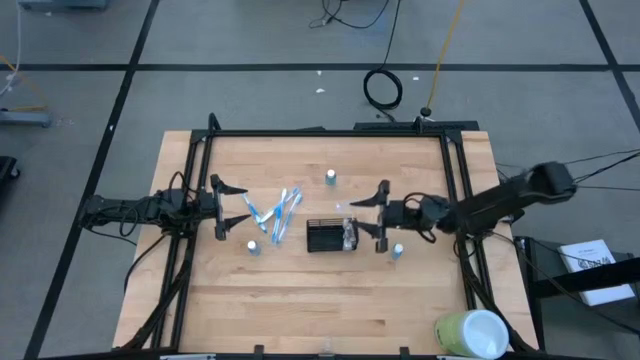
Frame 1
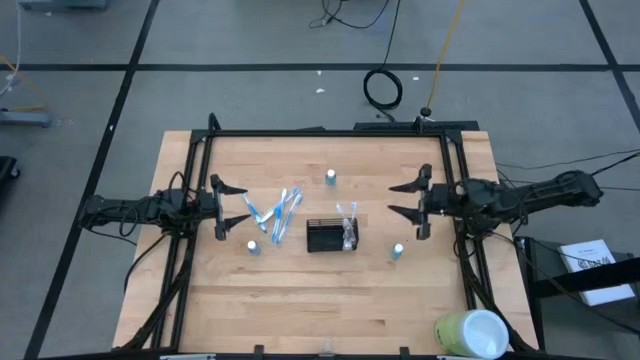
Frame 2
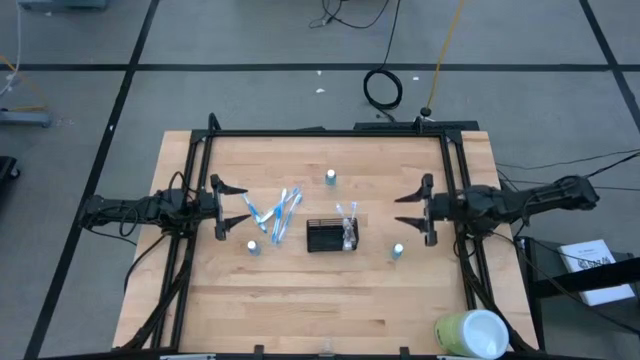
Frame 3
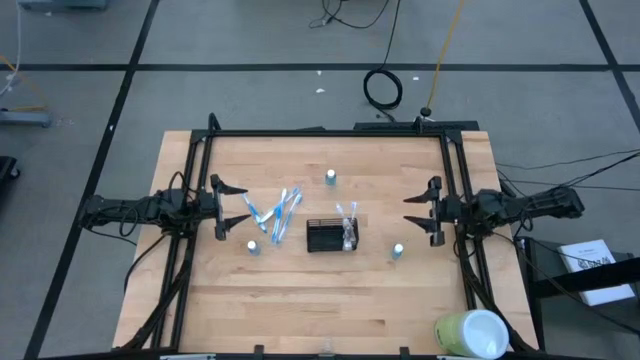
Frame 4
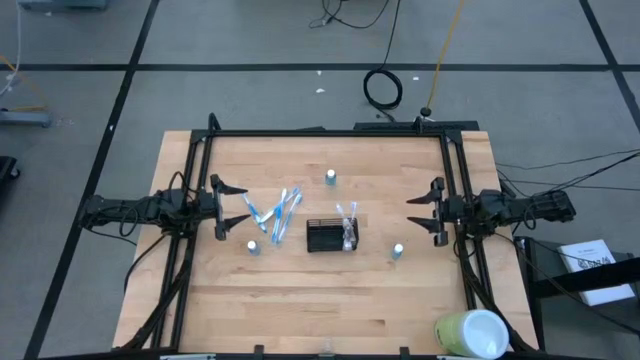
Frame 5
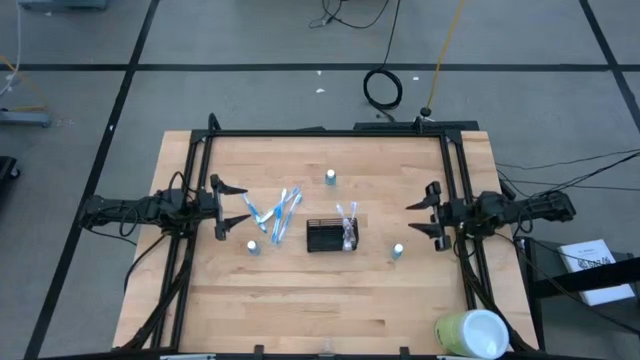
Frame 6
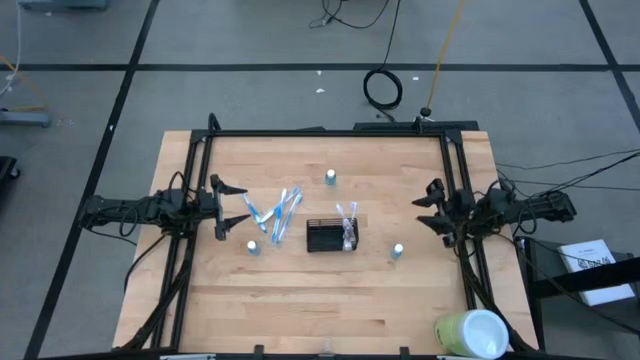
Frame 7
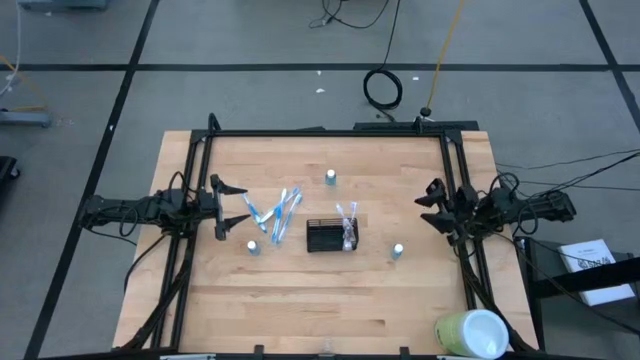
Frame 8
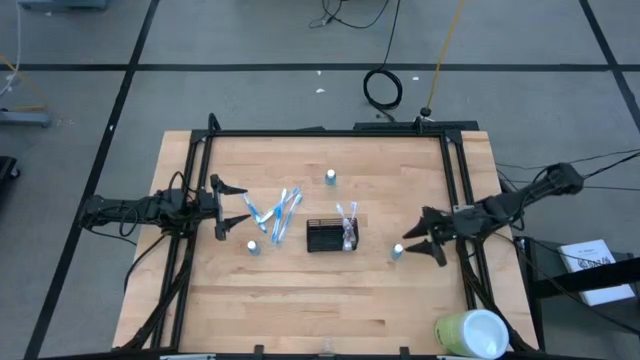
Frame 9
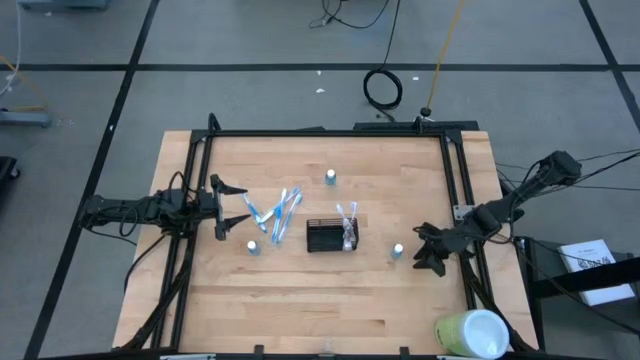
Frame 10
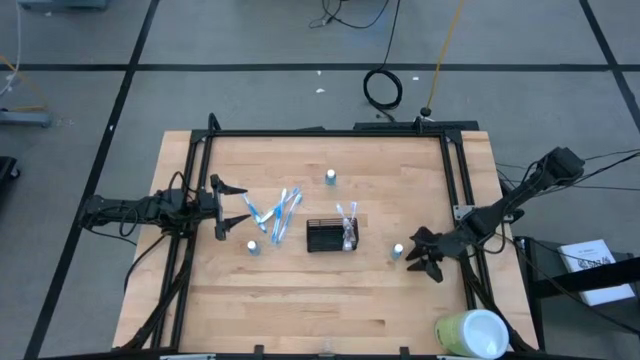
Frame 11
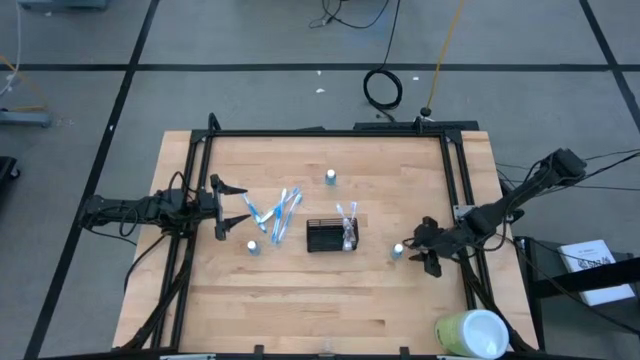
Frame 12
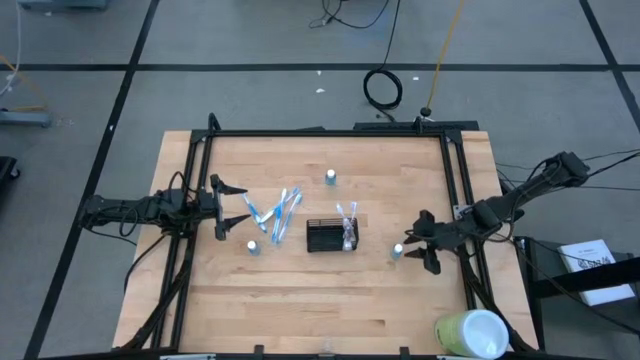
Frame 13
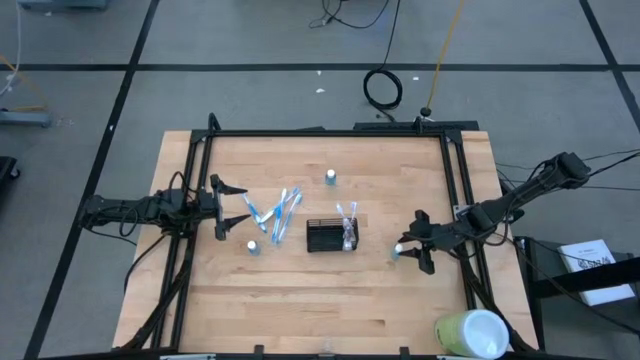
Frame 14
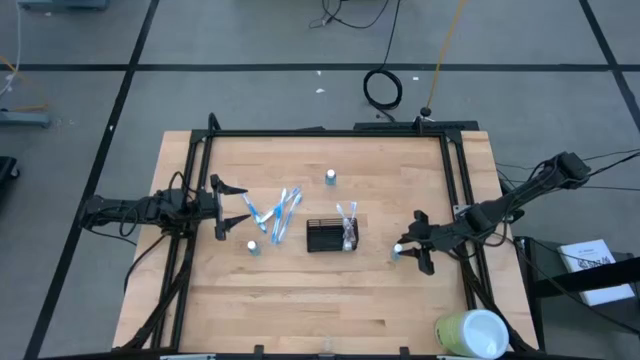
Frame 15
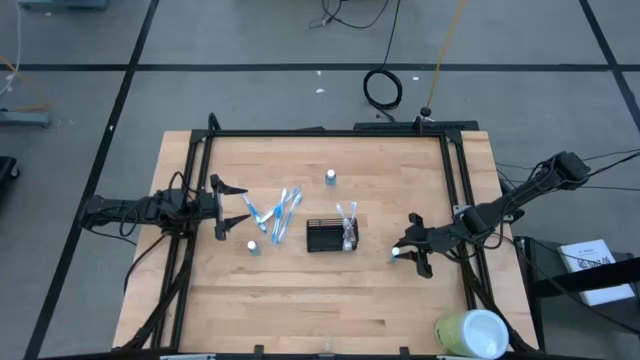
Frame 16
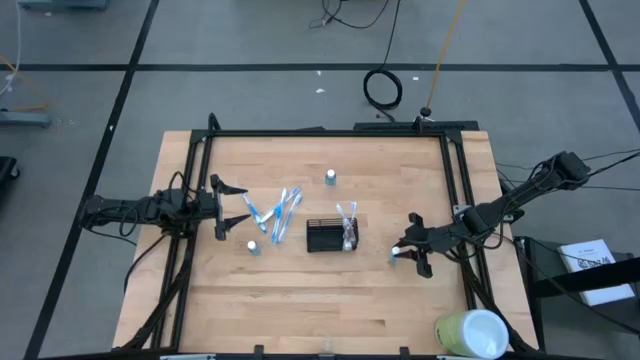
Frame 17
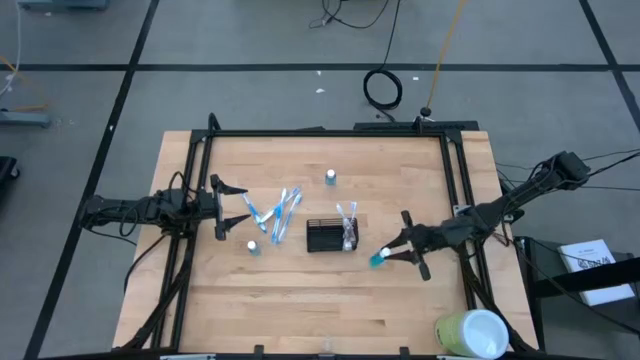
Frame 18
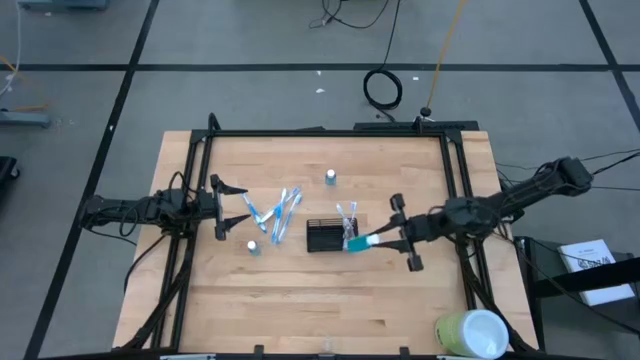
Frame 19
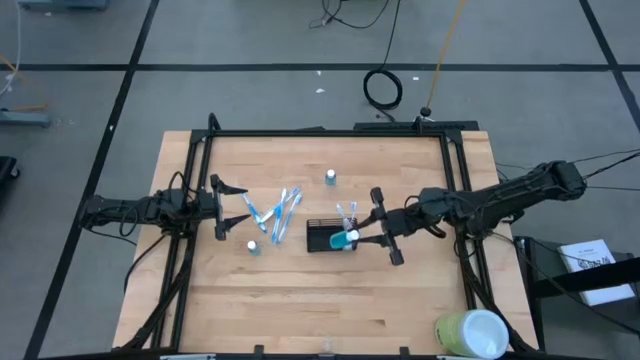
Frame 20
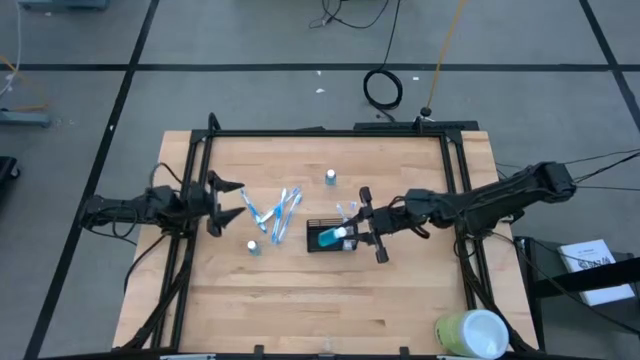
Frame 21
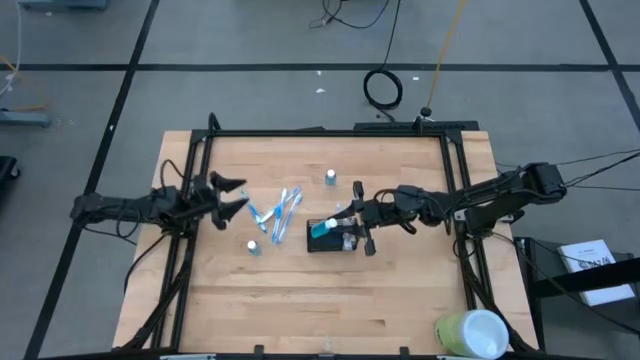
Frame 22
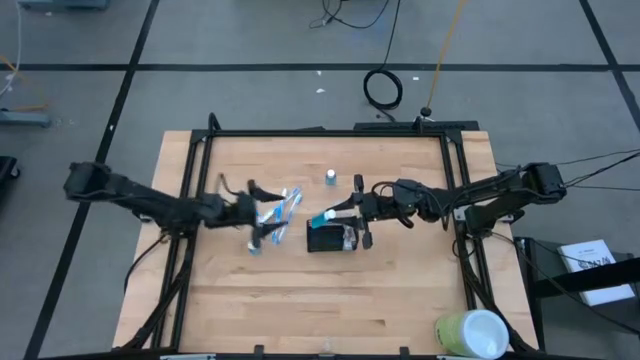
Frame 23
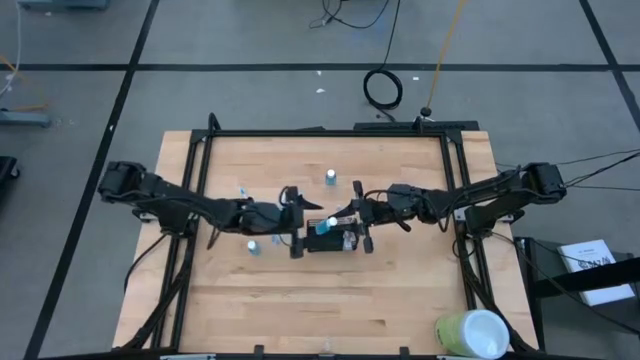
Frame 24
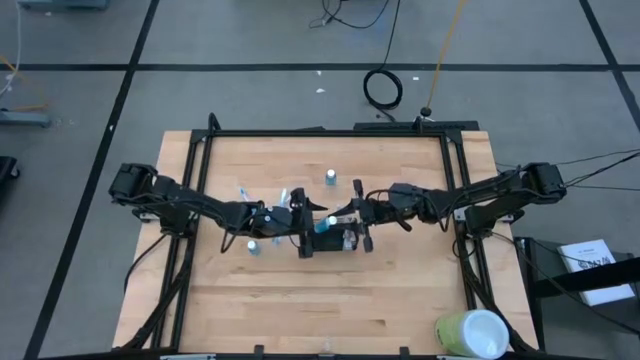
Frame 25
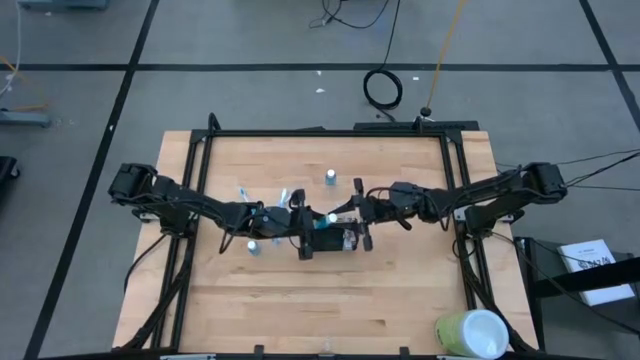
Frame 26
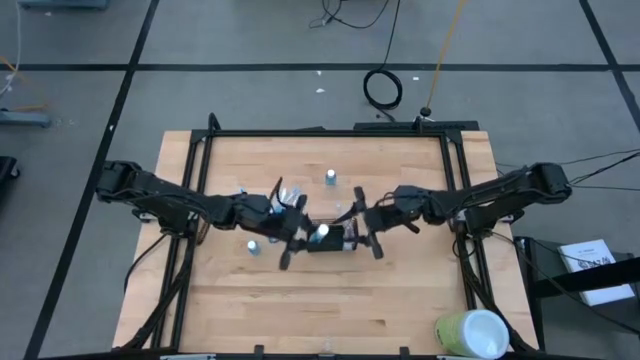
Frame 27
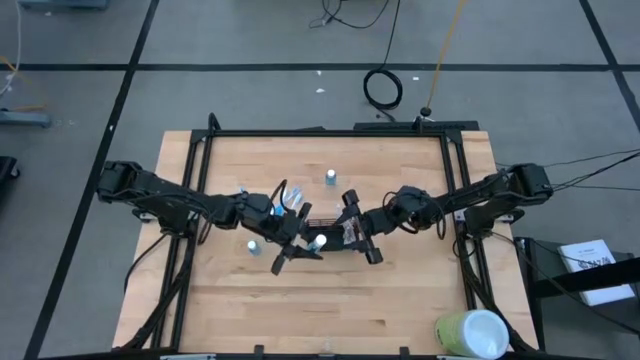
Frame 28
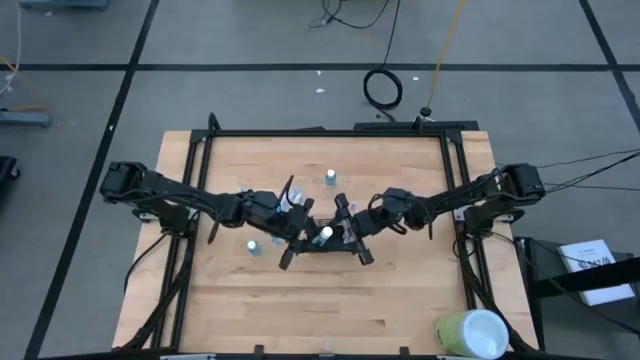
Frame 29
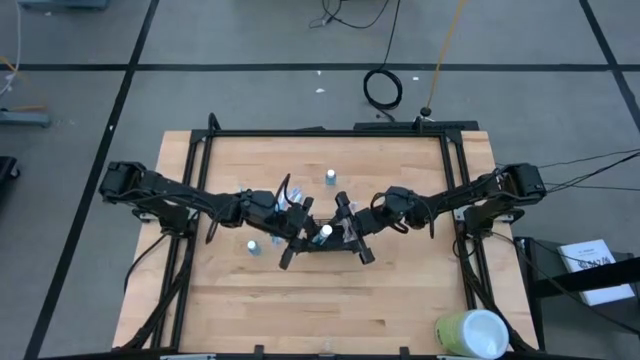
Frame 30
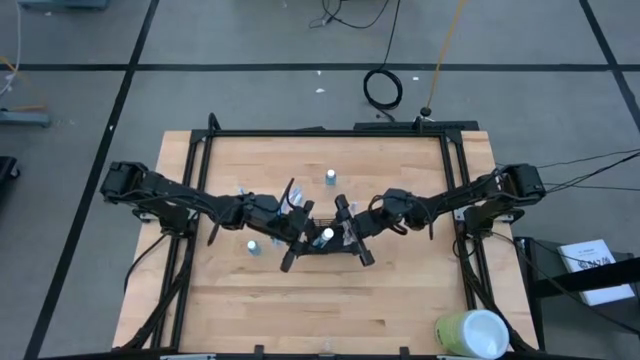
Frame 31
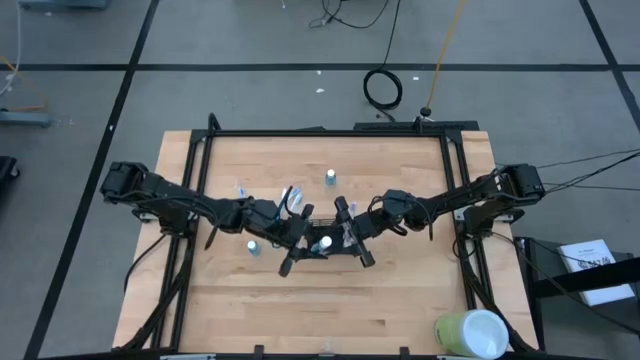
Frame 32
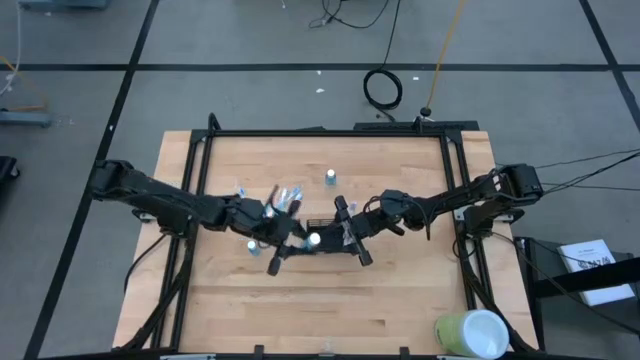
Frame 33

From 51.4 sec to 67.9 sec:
Task: Pick & Place toothbrushing station
Put the bottom right mouthwash into the middle section of the wire organizer

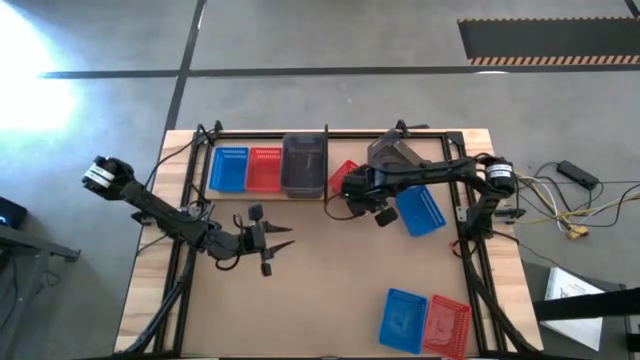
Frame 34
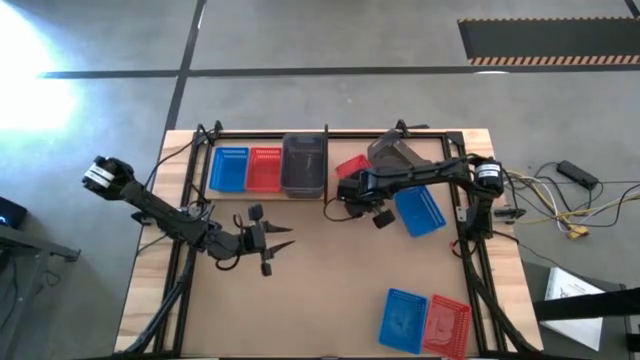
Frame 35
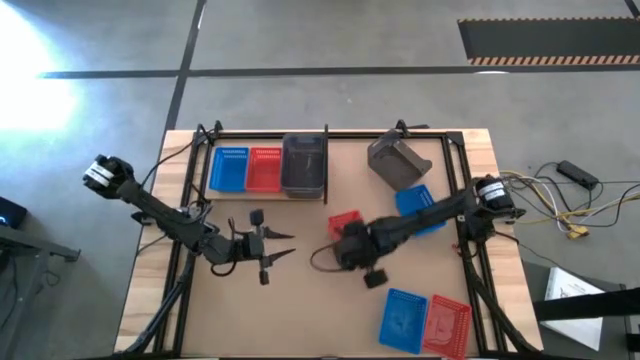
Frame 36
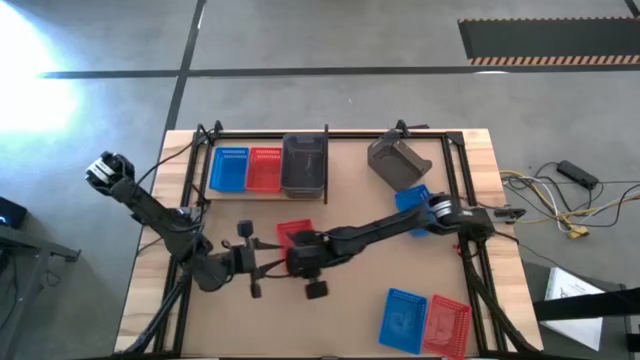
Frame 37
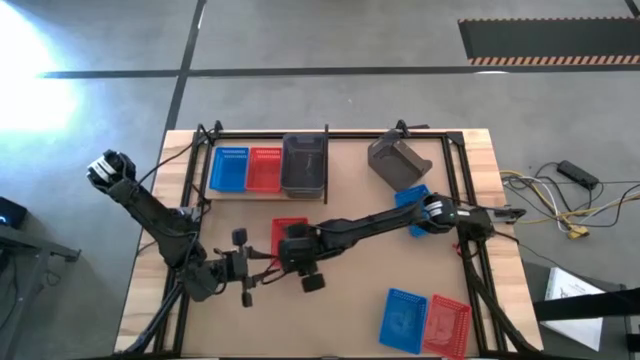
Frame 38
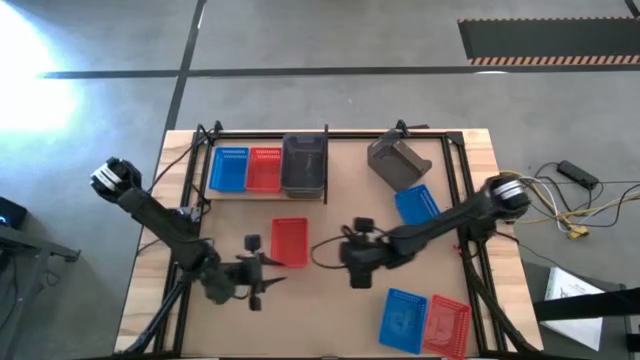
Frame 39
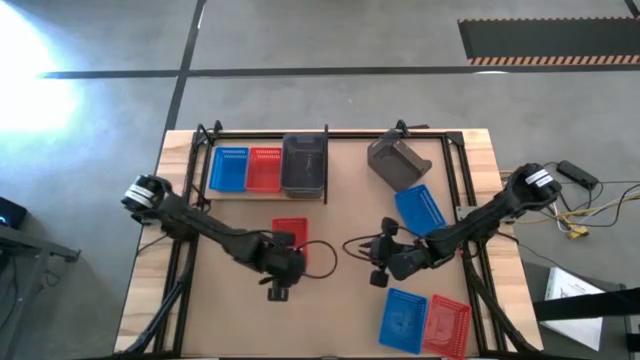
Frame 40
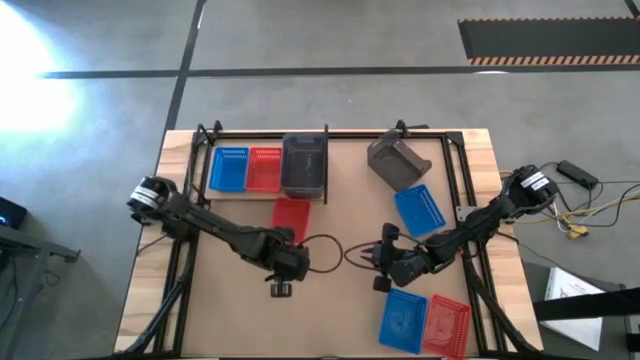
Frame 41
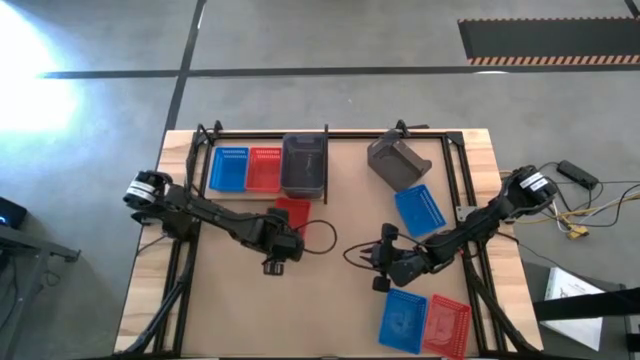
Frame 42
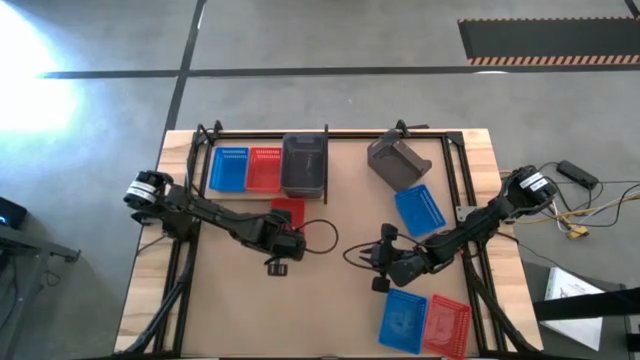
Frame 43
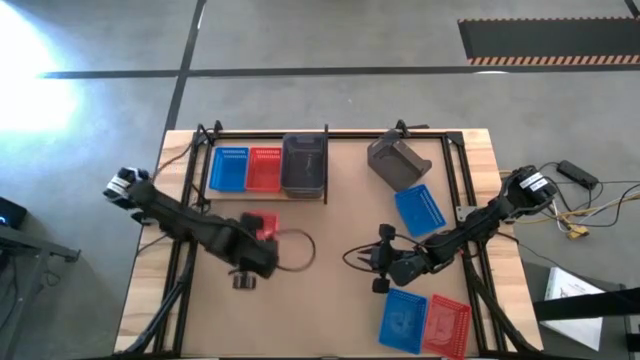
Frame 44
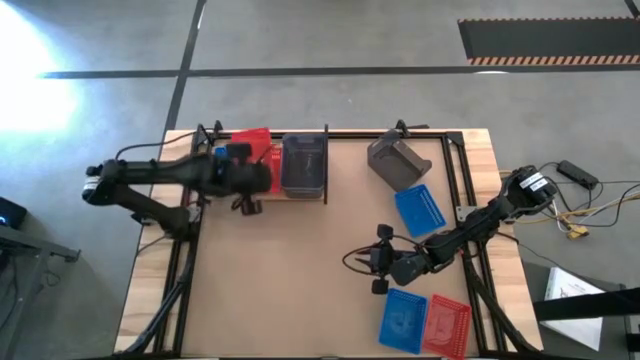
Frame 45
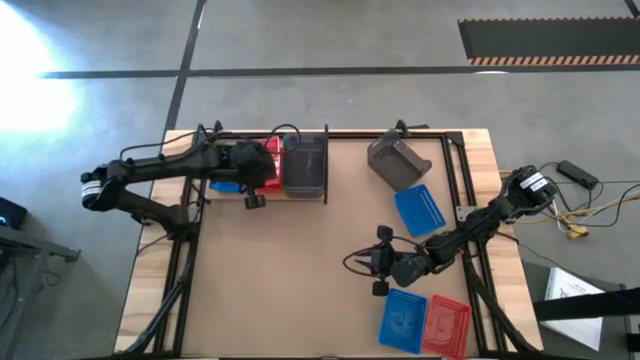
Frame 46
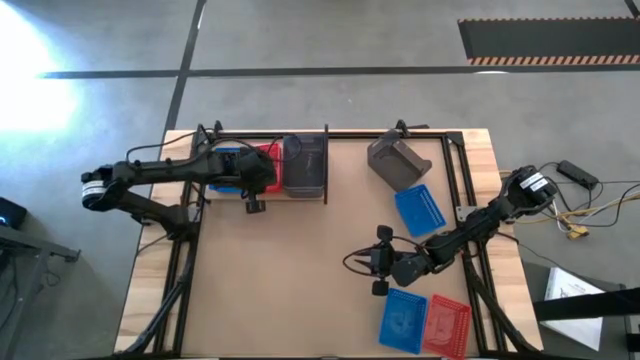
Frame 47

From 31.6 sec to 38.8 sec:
Task: Stack baskets on shelf by color
Stack the top red bin on the red bin on the shelf
